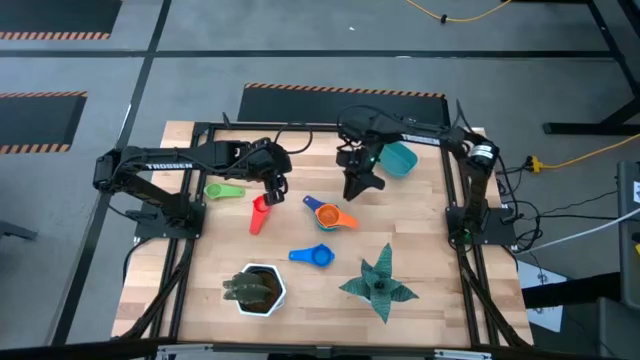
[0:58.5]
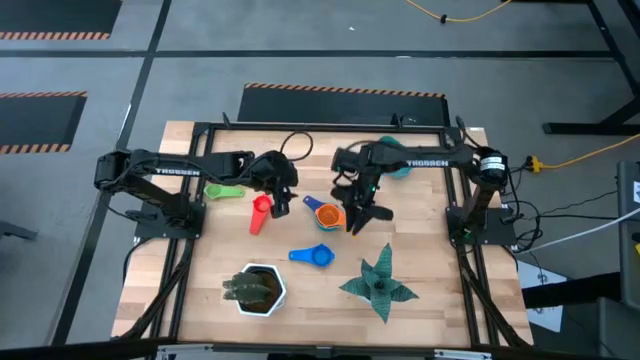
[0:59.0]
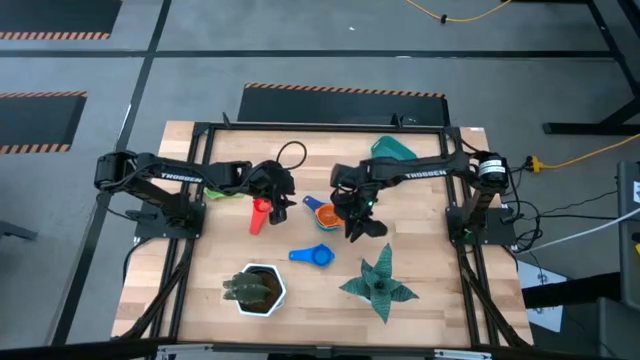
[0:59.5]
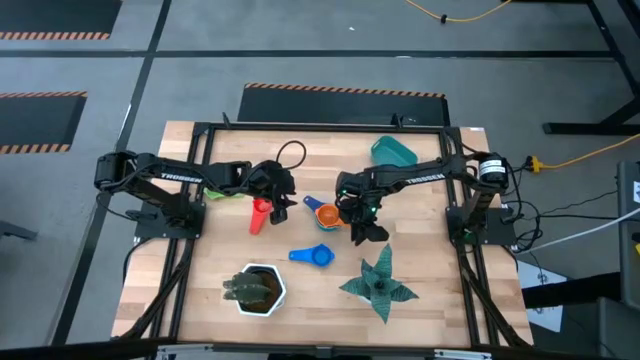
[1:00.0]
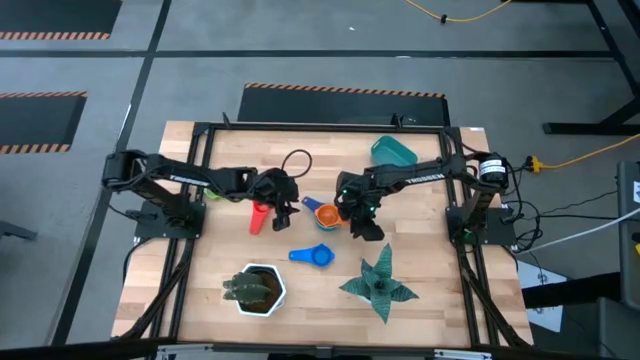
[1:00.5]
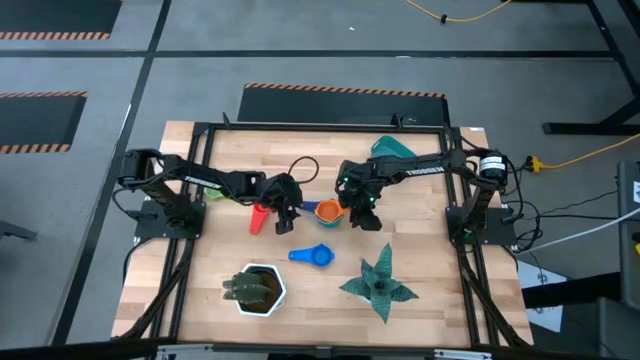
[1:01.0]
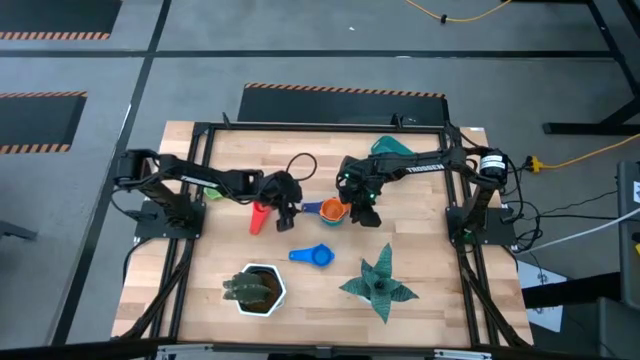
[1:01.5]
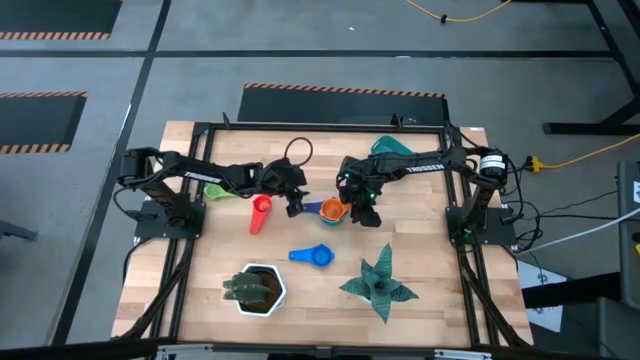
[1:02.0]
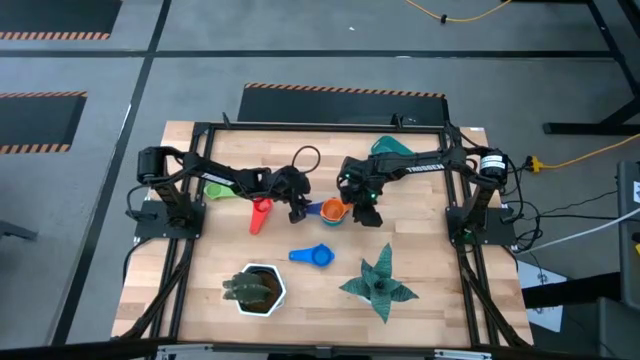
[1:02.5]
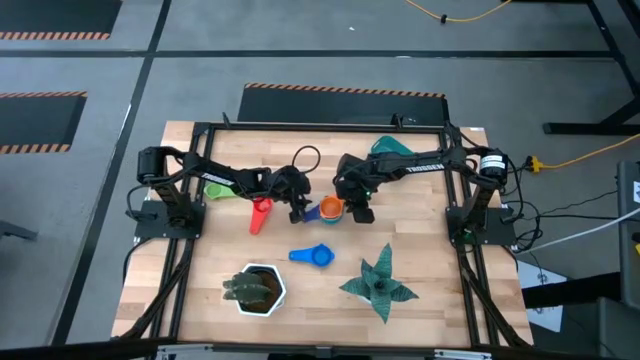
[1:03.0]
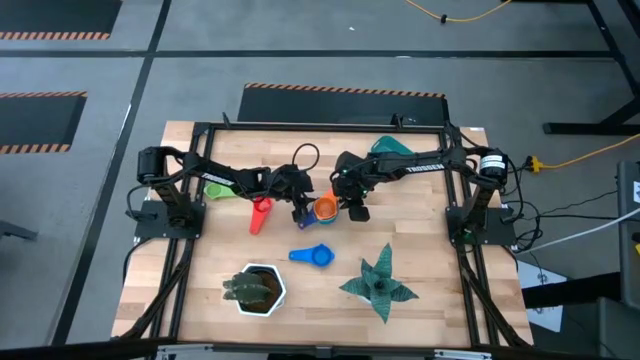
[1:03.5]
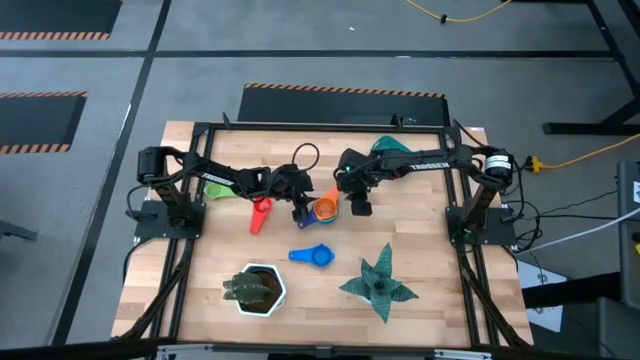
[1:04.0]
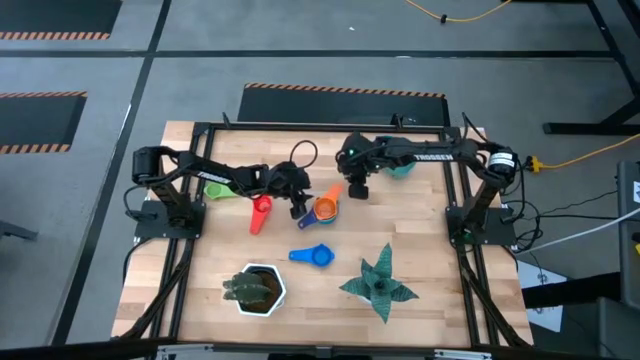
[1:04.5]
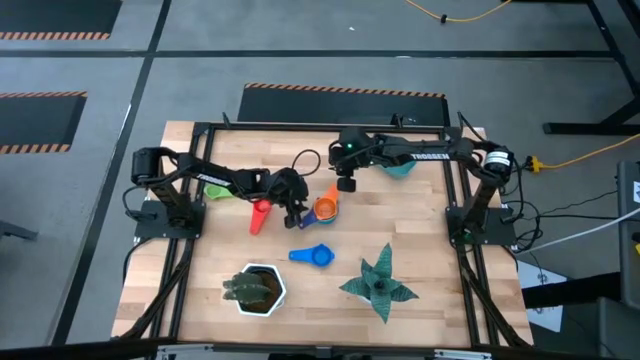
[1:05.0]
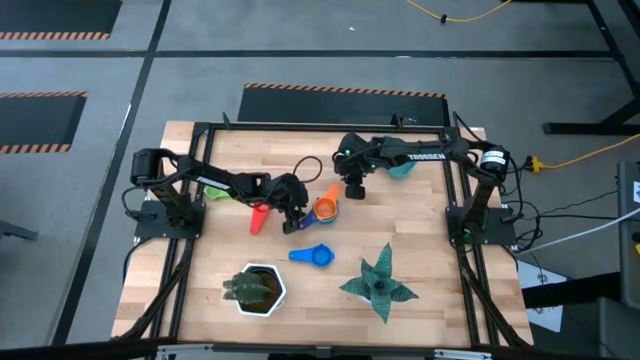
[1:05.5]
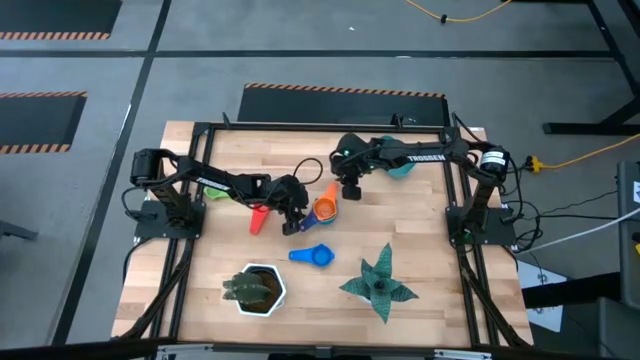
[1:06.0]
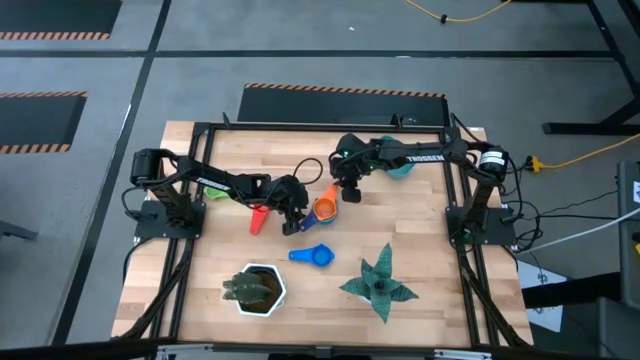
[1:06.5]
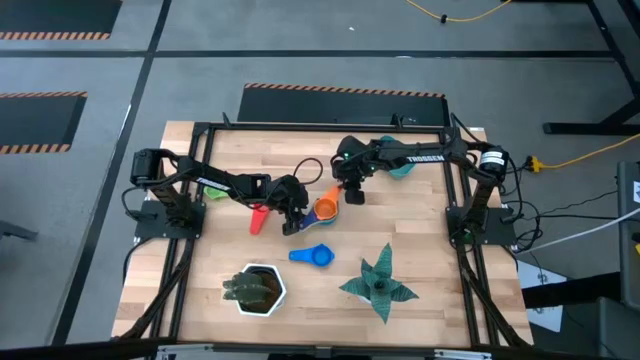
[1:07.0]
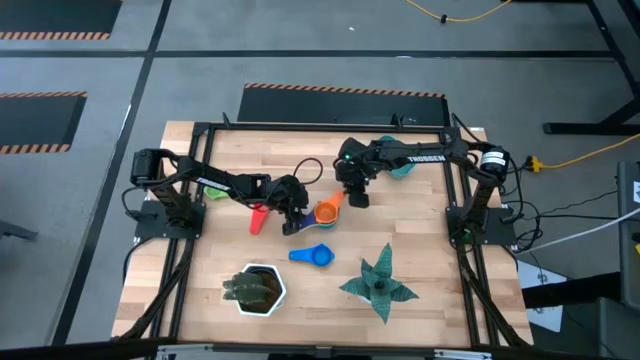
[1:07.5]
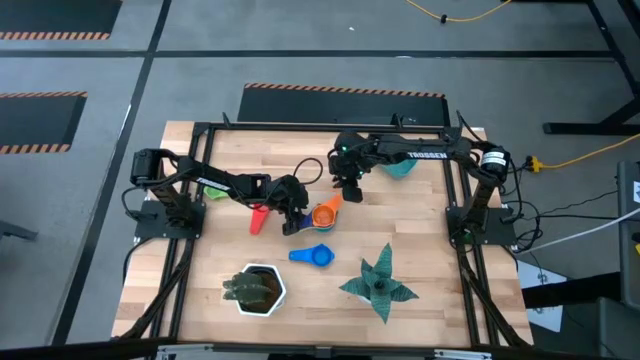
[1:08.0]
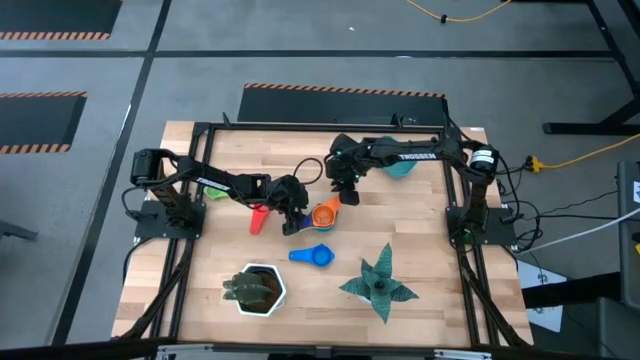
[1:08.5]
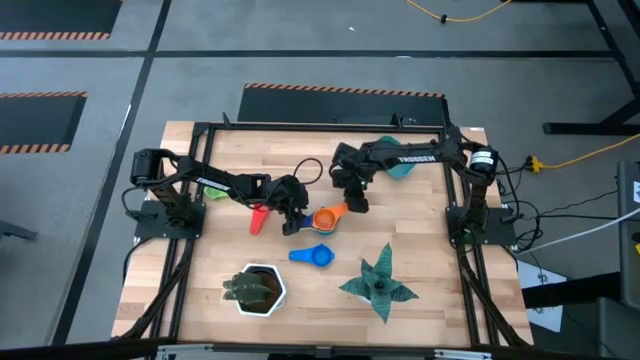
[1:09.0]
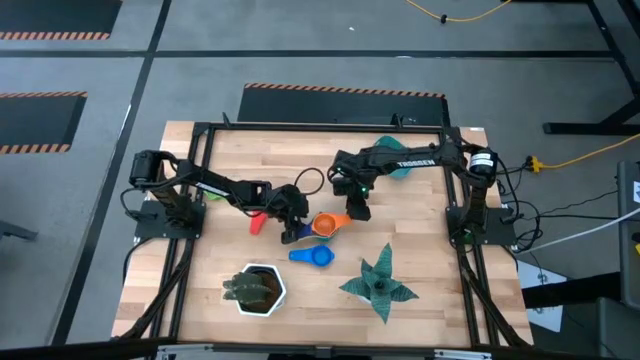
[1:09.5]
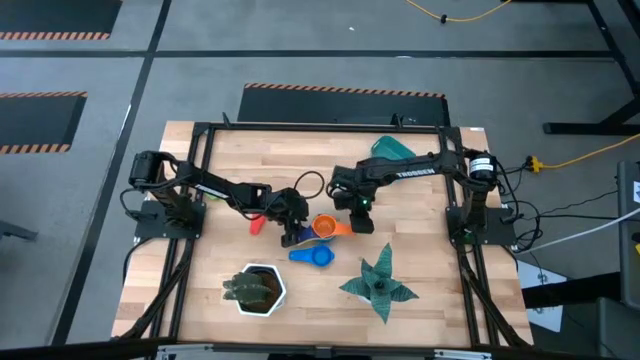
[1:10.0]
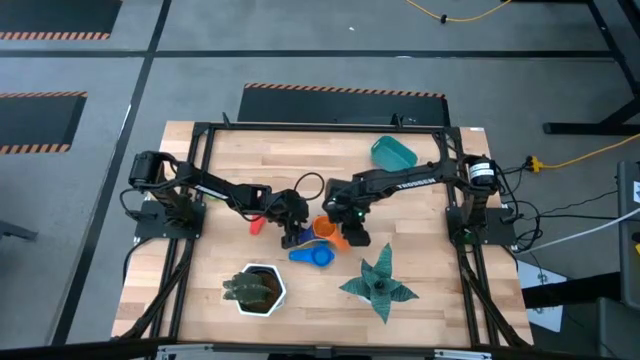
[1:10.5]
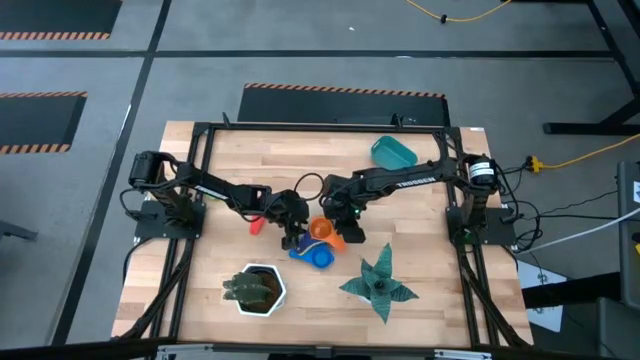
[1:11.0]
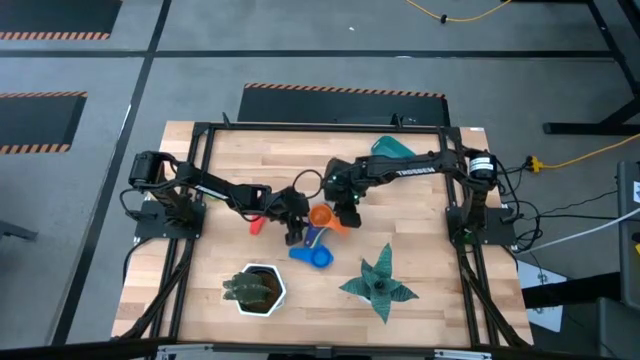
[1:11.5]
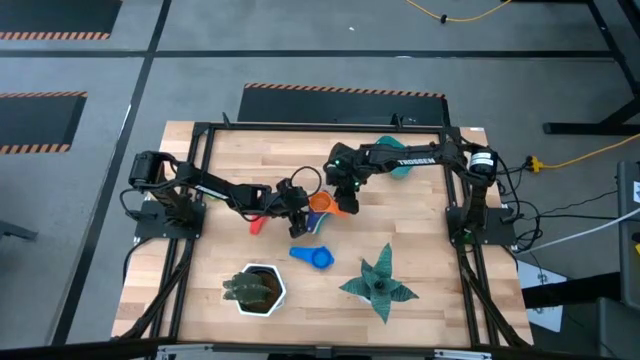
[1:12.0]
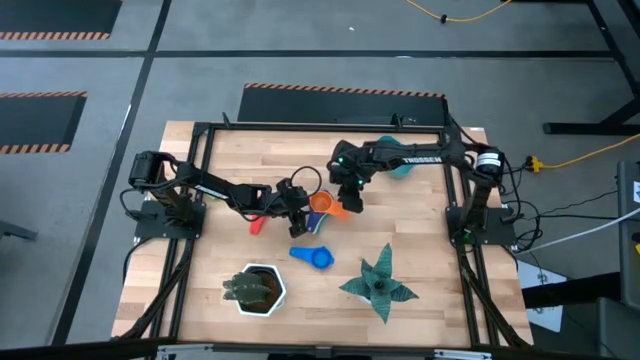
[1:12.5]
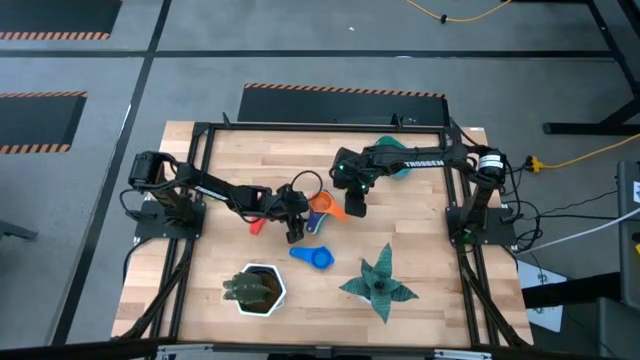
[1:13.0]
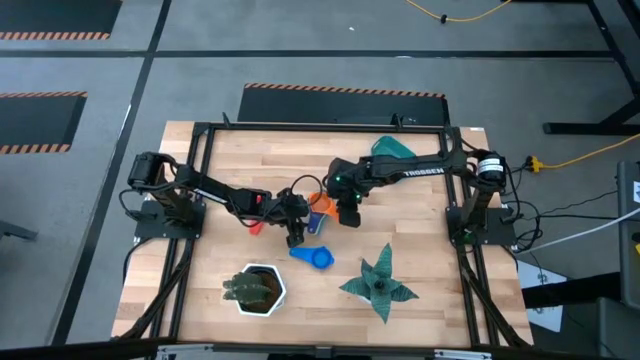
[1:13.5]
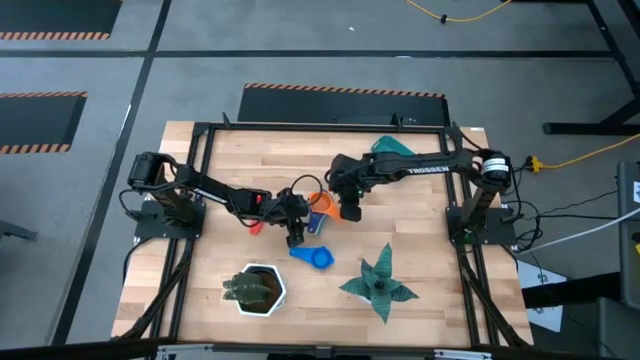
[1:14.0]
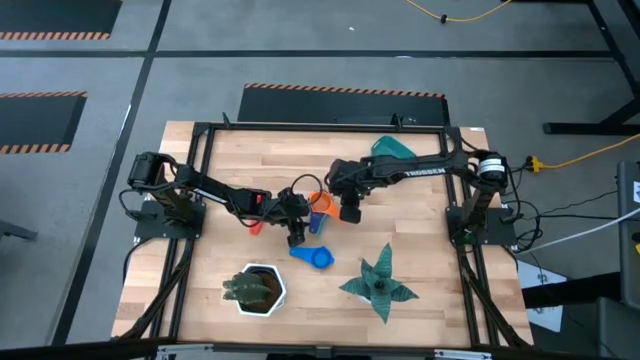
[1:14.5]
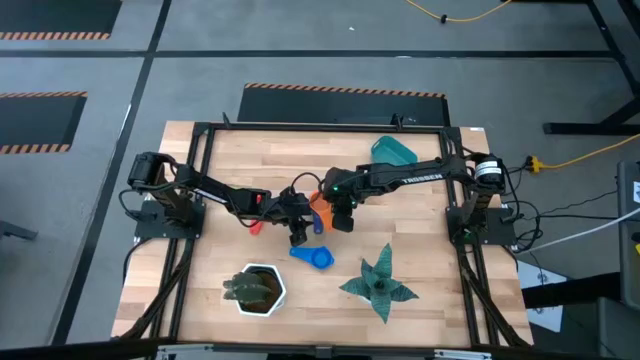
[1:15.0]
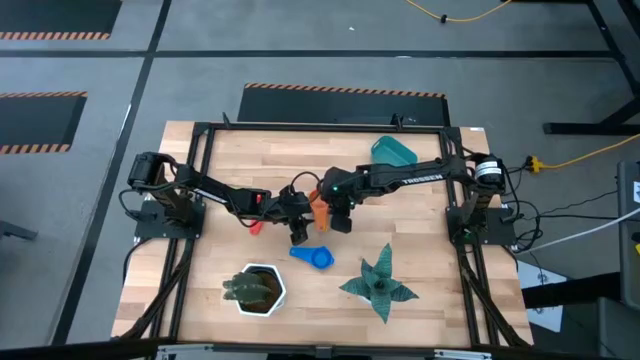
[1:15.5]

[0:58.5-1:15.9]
Task: Nest measuring cups in basket
Stack the orange measuring cup on top of the dark blue measuring cup

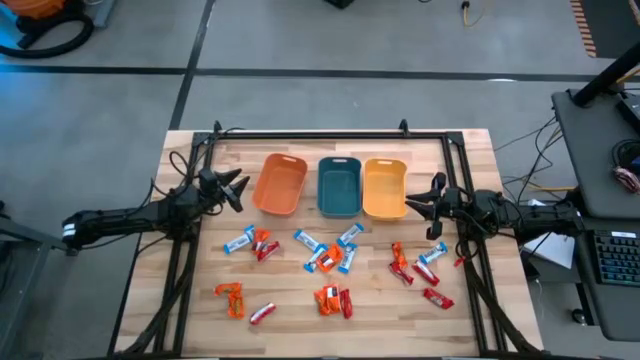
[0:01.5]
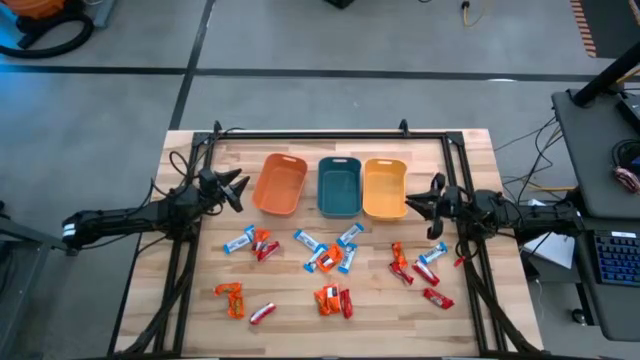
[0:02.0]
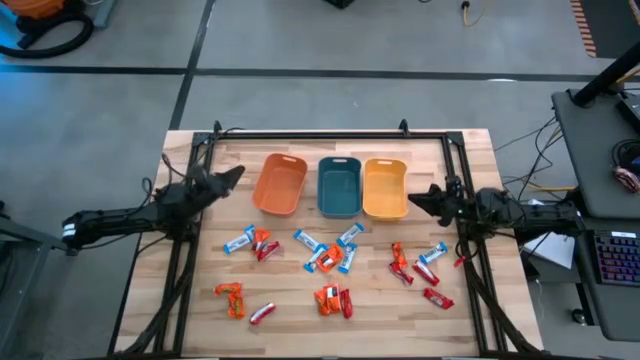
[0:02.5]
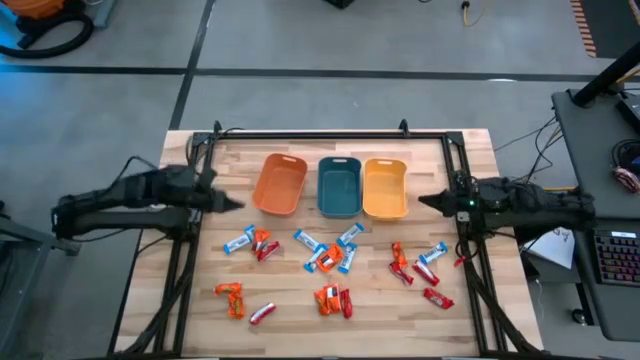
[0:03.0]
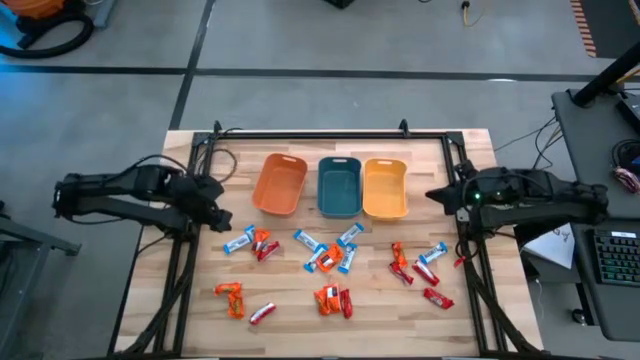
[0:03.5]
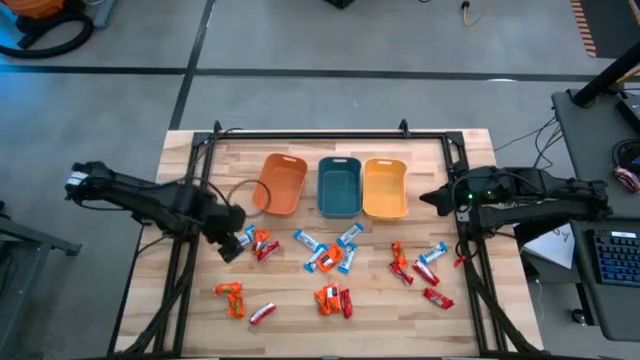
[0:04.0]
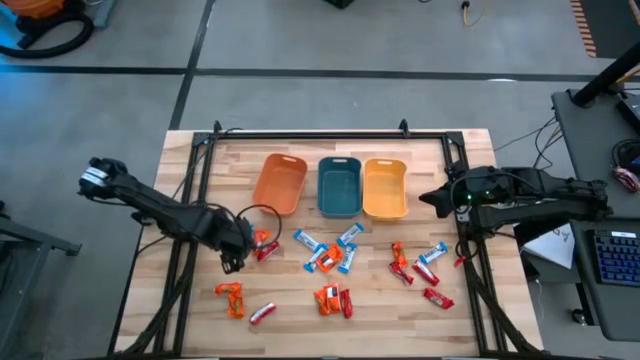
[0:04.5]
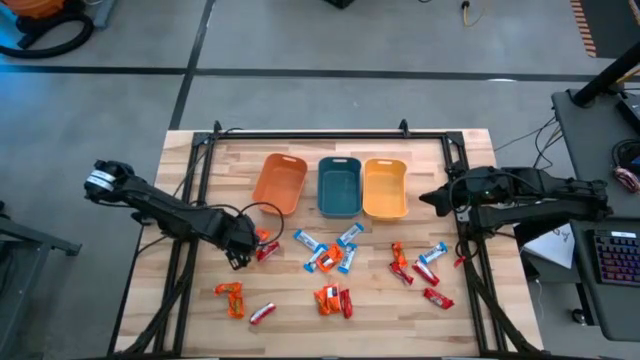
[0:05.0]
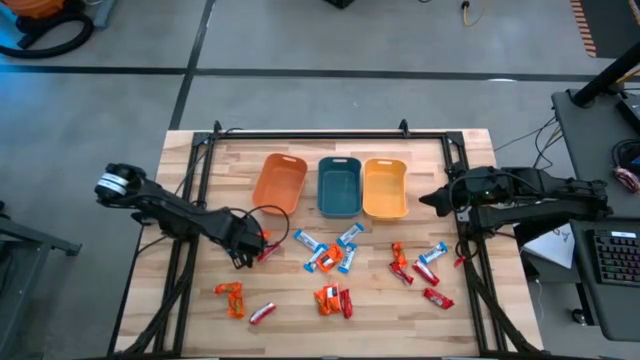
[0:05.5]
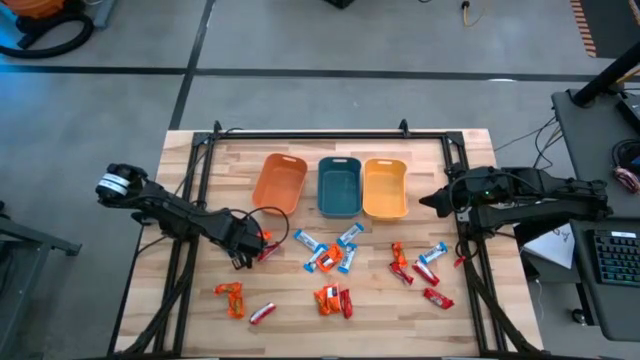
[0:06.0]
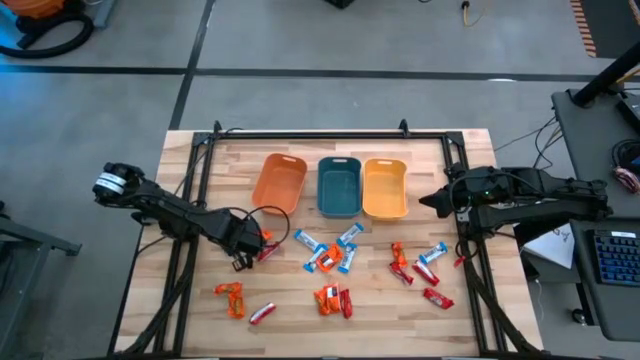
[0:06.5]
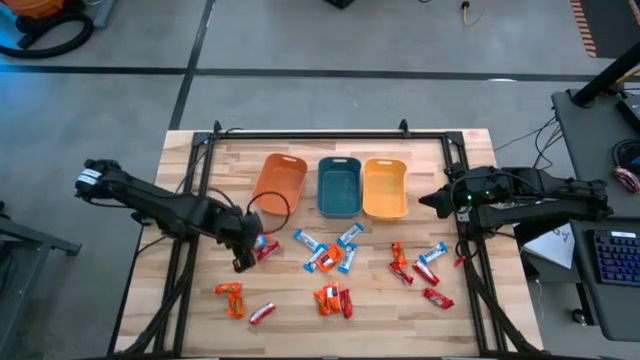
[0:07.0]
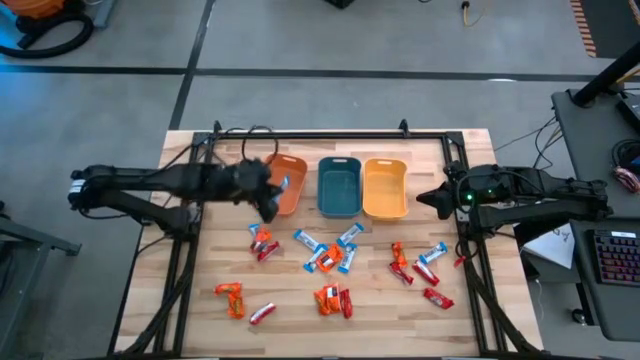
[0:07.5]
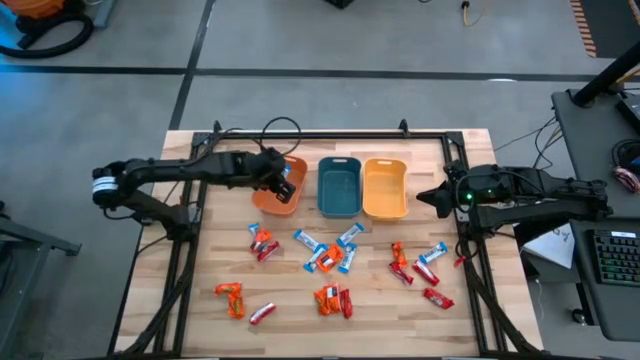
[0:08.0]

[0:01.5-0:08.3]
Task: Sort candy
Put the white chocolate bar into the orange bin
